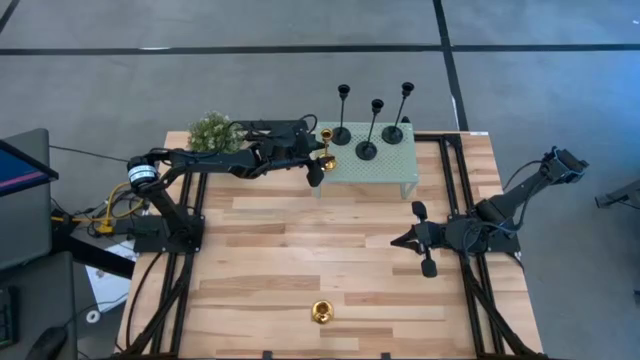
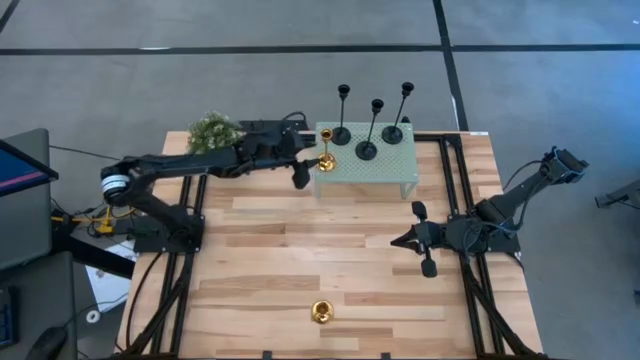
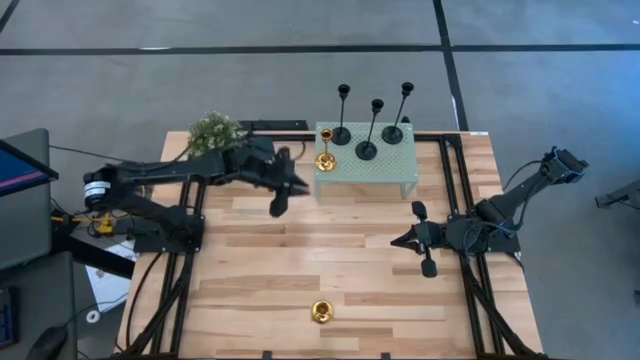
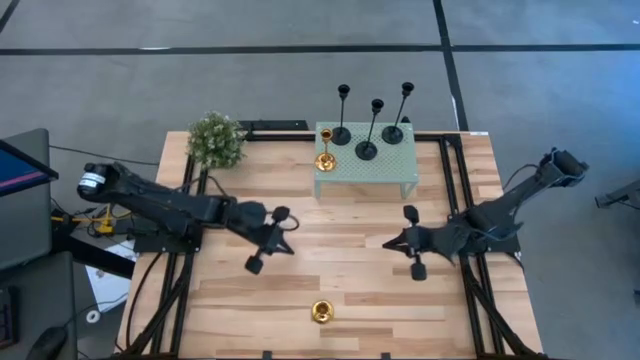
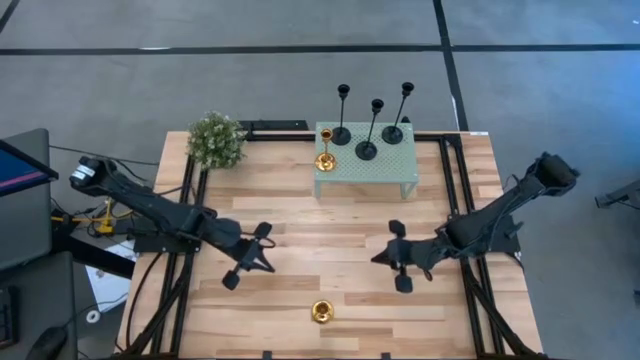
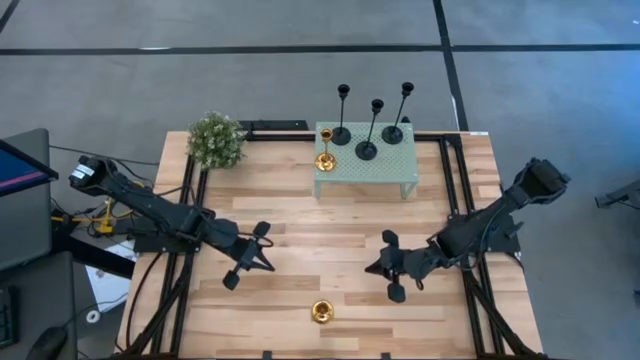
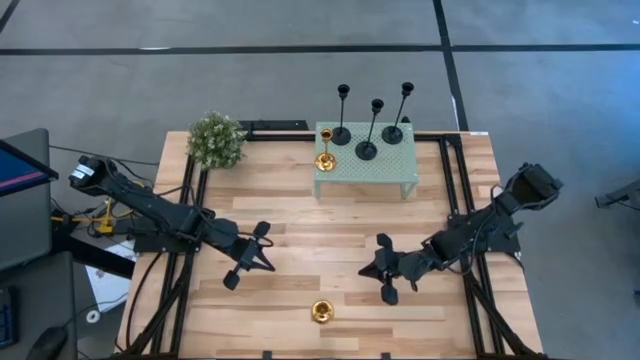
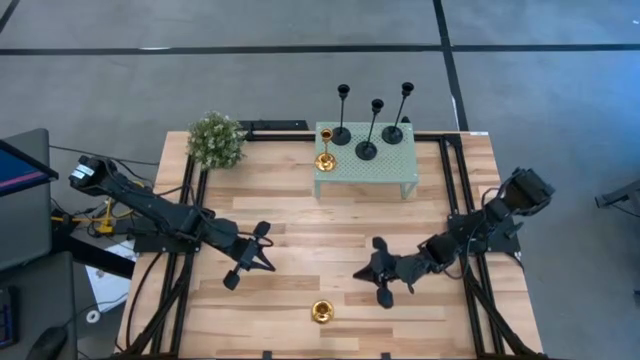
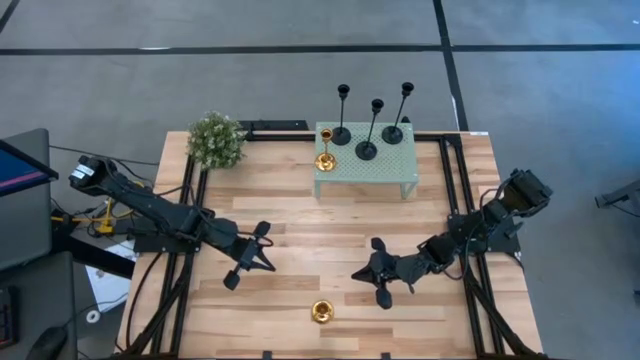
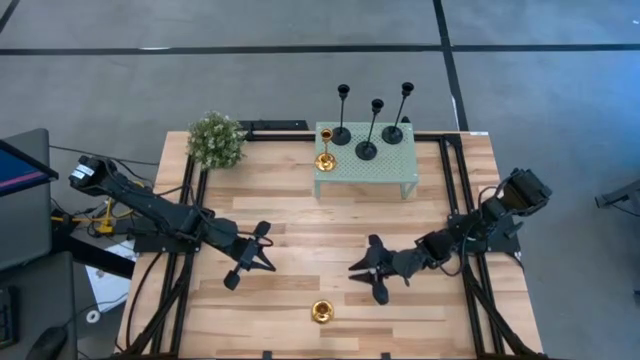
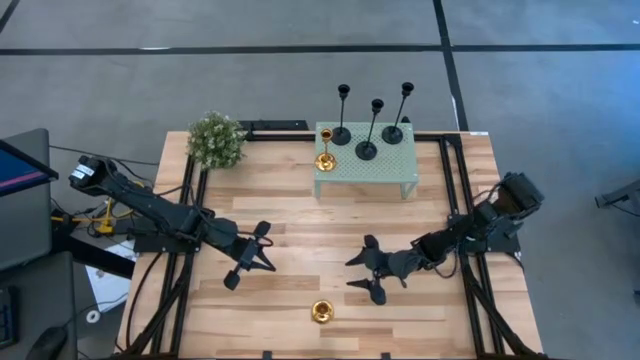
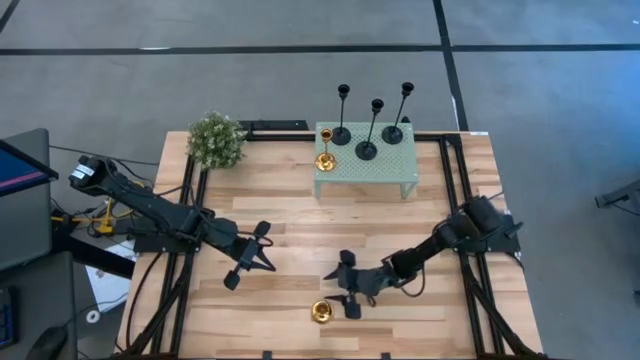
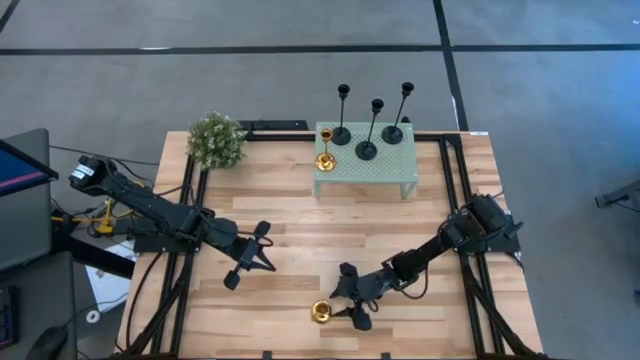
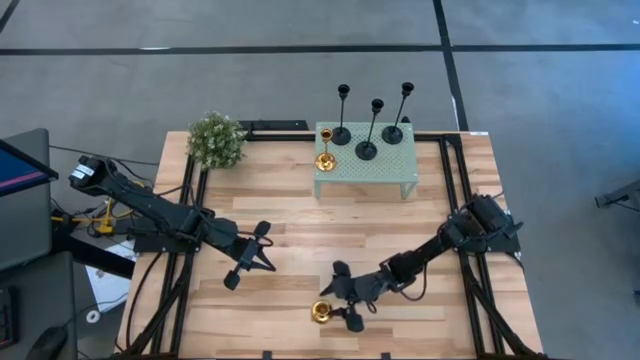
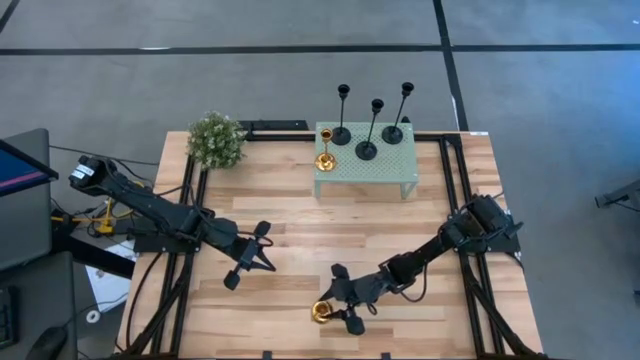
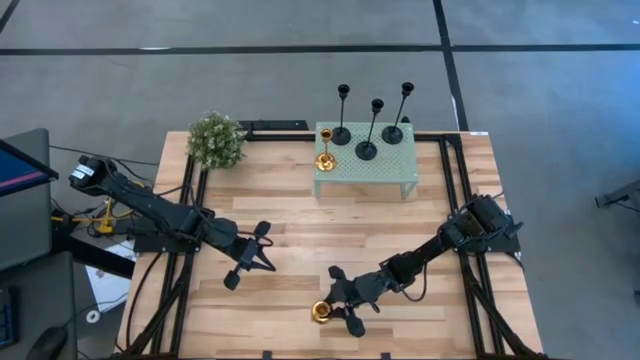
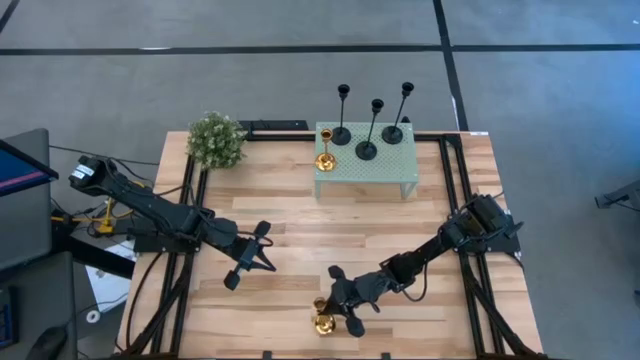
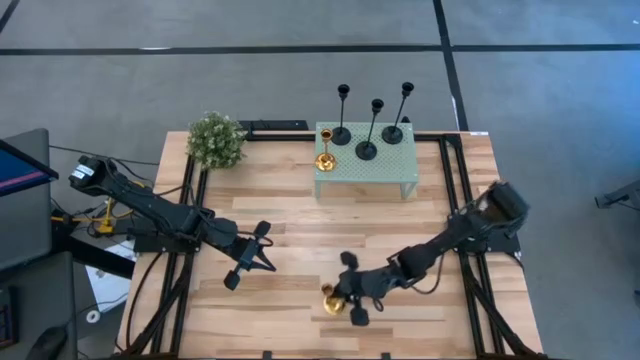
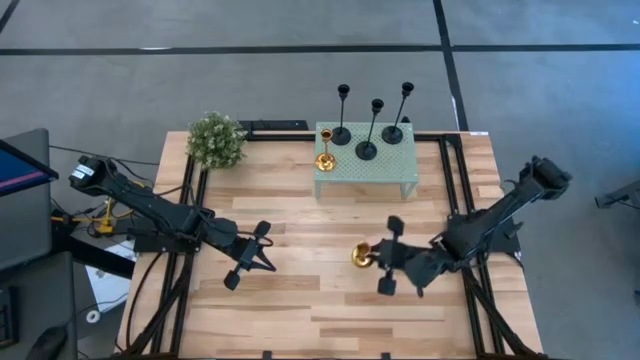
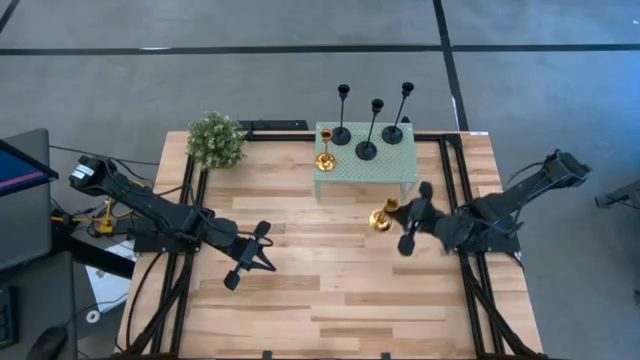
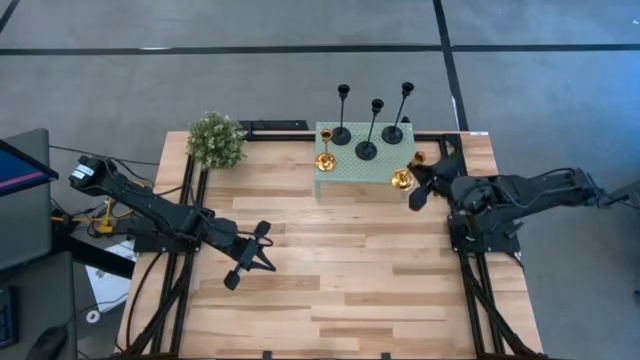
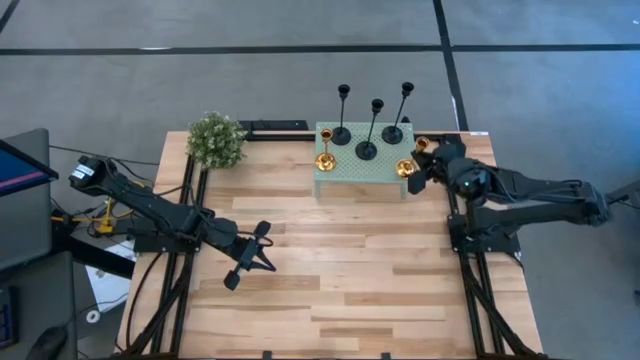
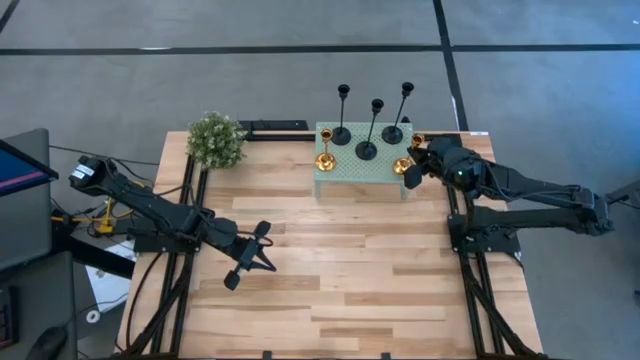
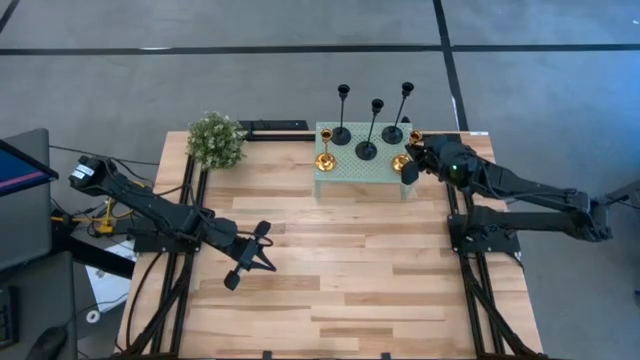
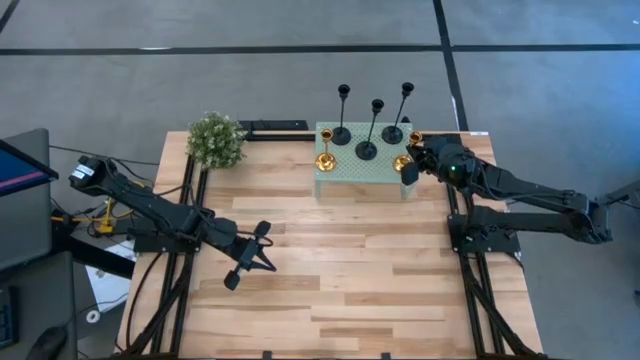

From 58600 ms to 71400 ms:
Task: Pick & Place candle stick holders
Put the gold candle holder on the shelf

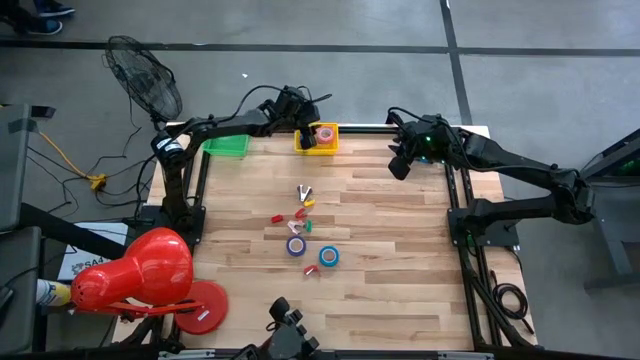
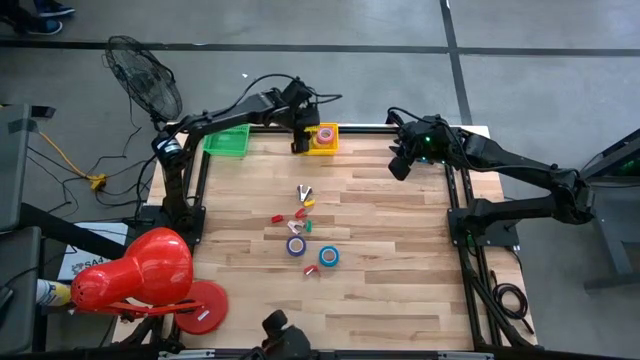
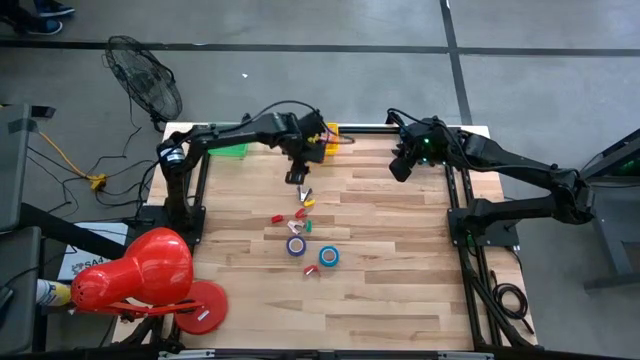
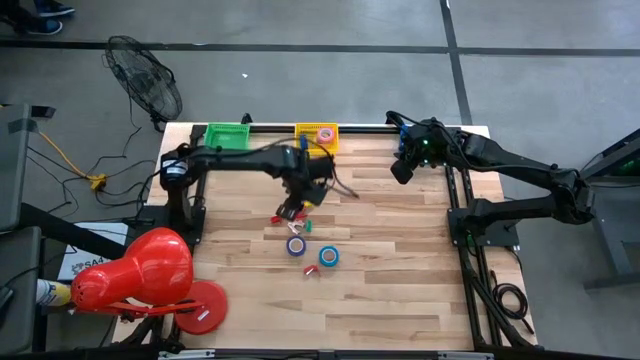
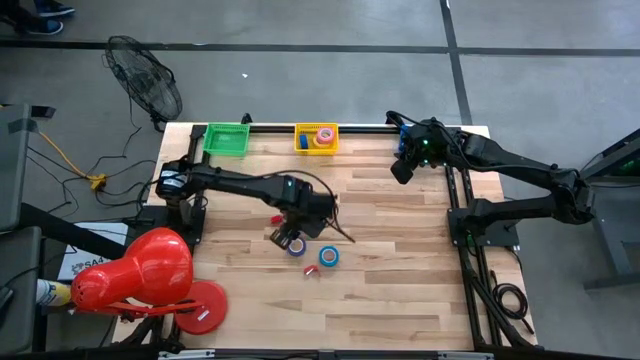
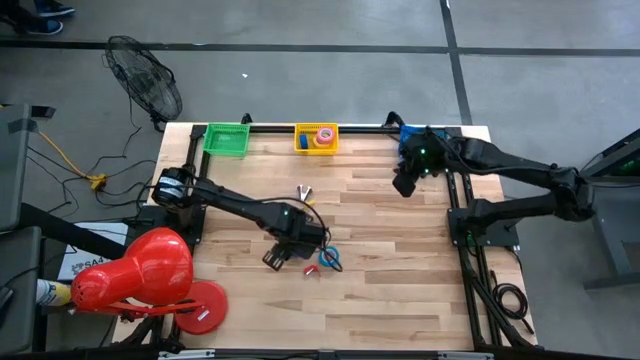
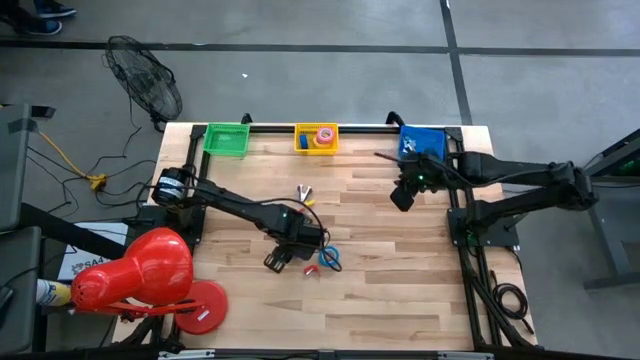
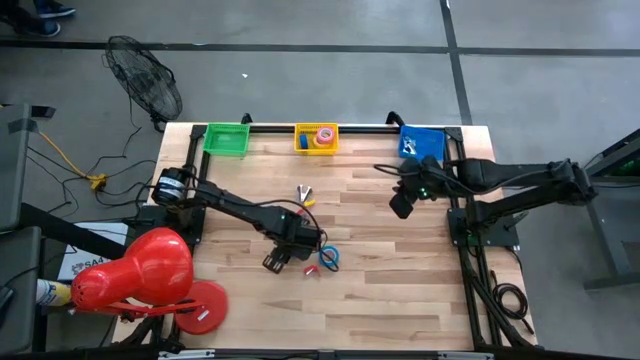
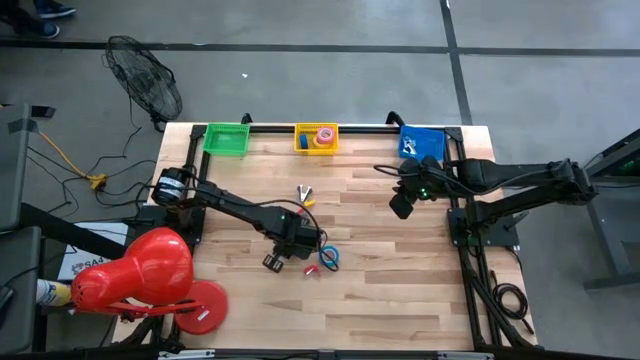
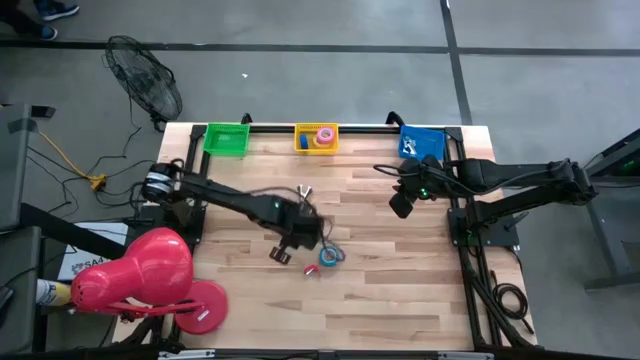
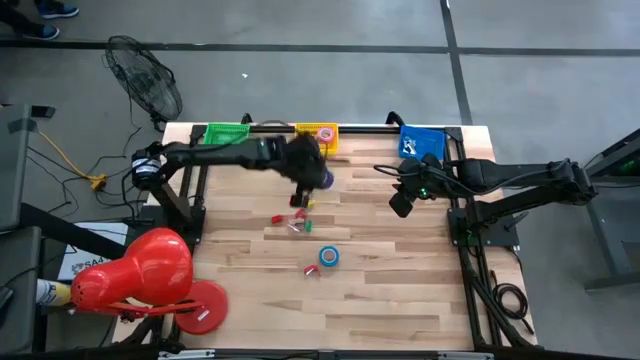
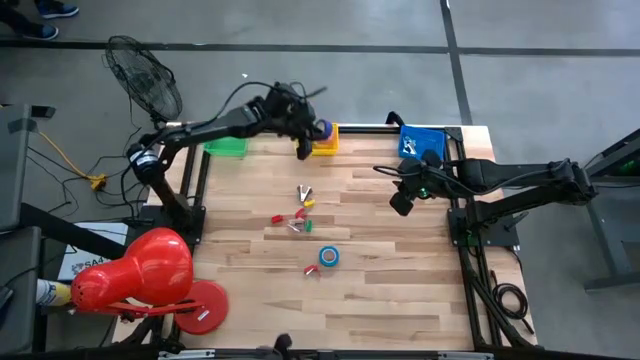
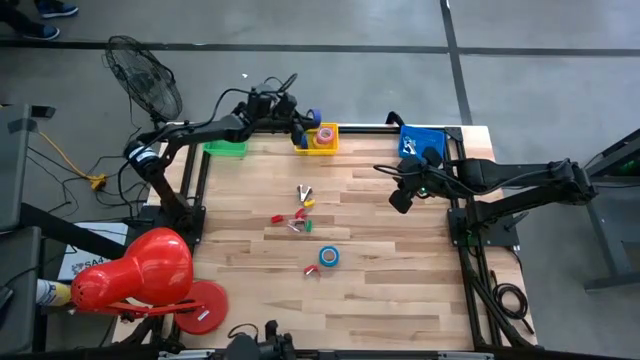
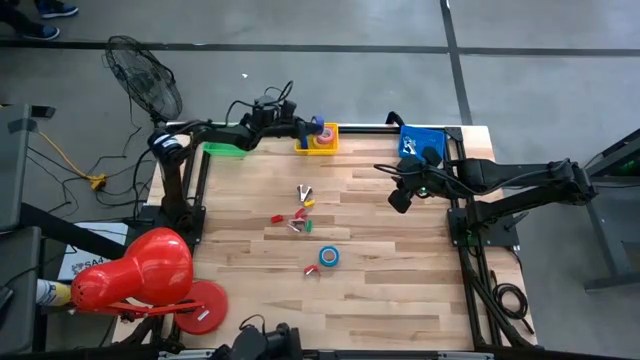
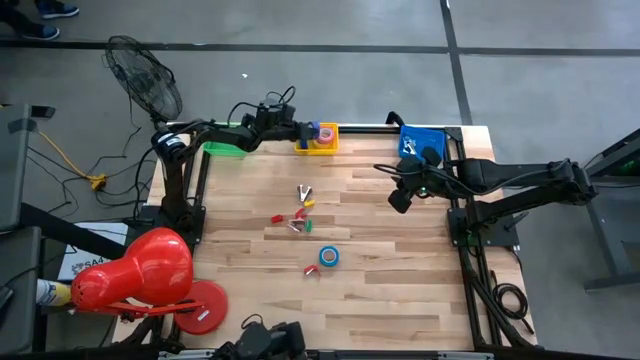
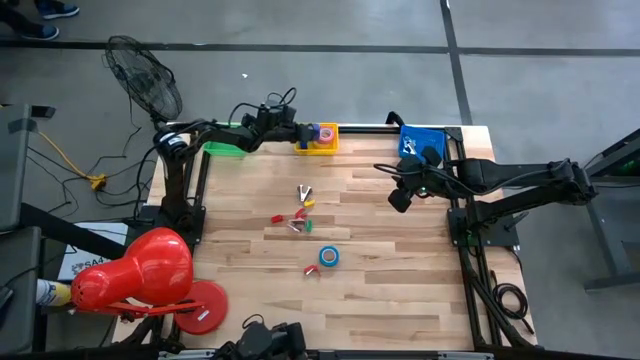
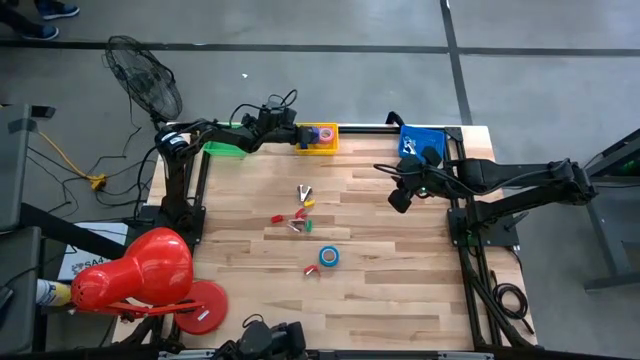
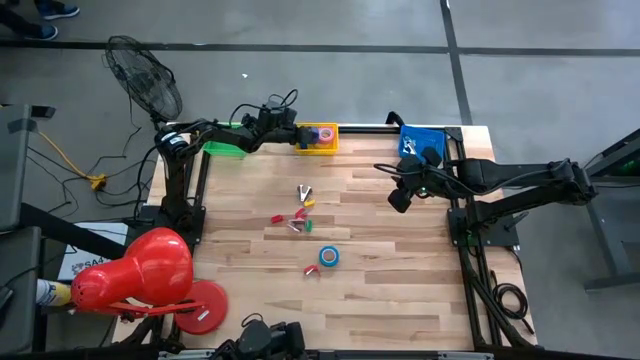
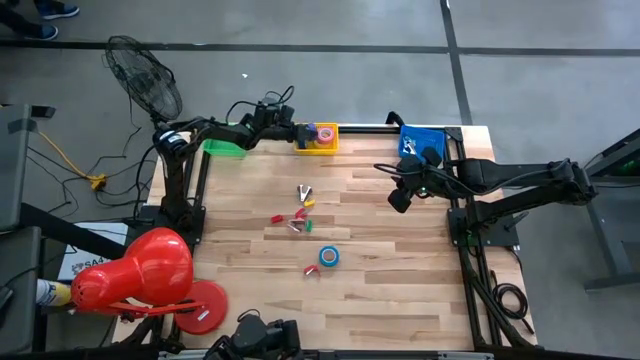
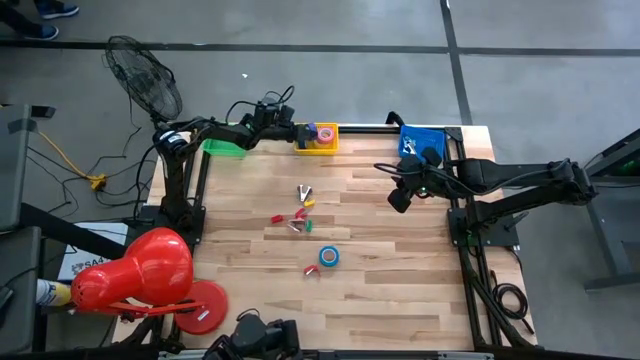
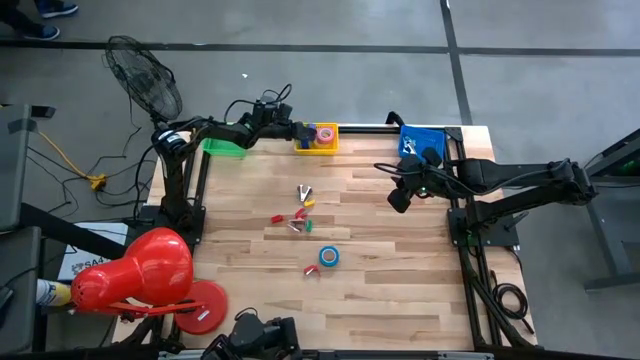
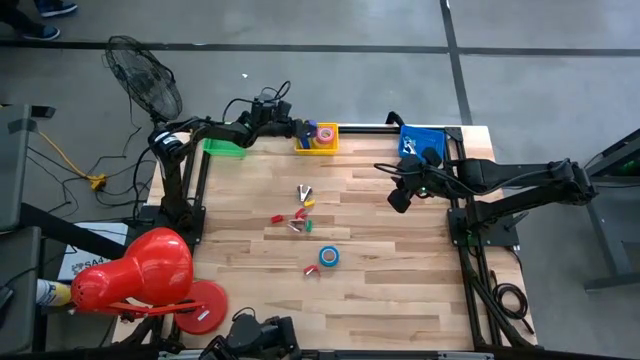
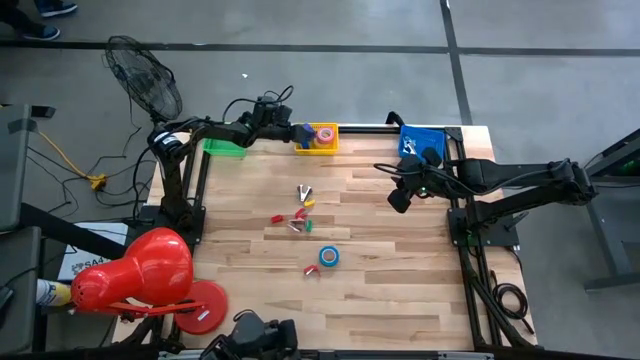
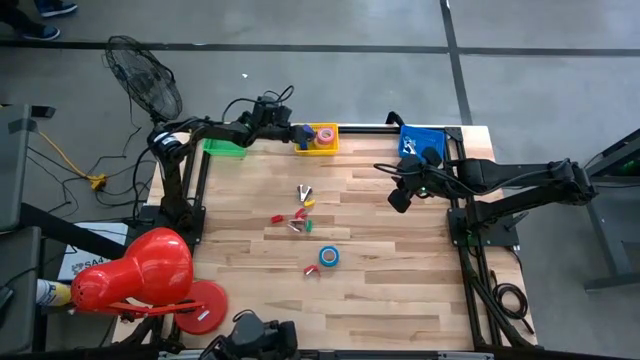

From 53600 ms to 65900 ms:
Task: Pick and place Stapler, Stapler remover, tape
Put the blue tape into the yellow bin
